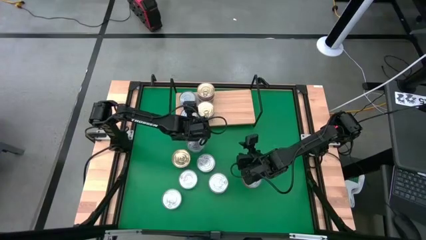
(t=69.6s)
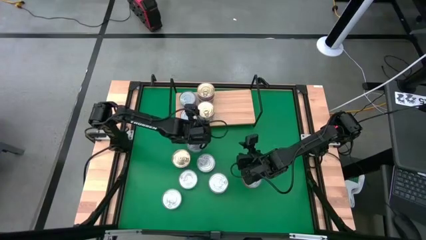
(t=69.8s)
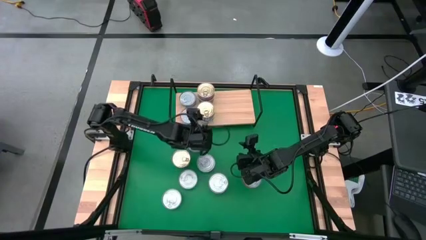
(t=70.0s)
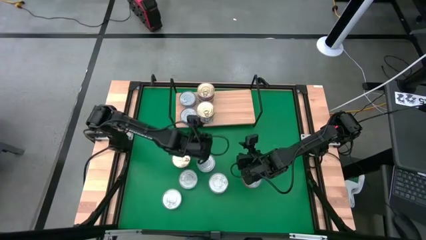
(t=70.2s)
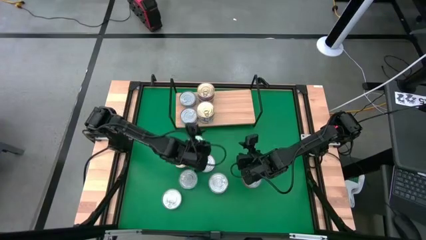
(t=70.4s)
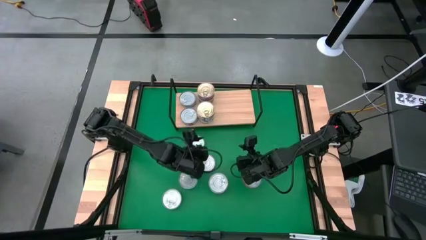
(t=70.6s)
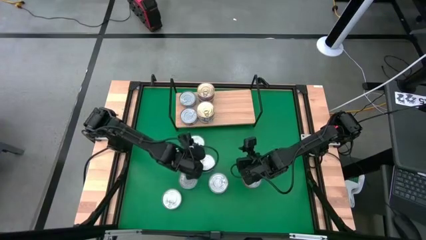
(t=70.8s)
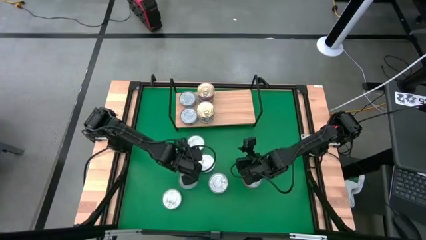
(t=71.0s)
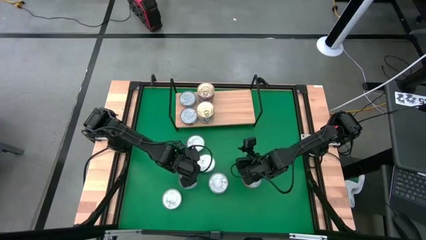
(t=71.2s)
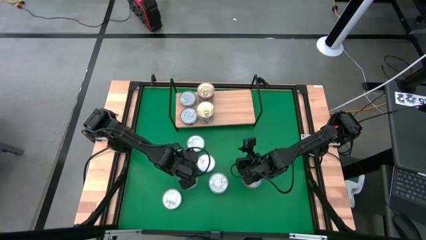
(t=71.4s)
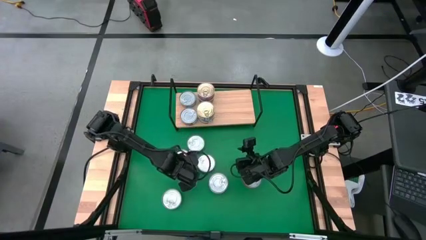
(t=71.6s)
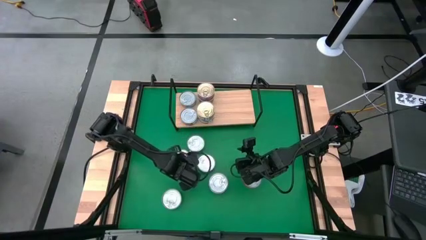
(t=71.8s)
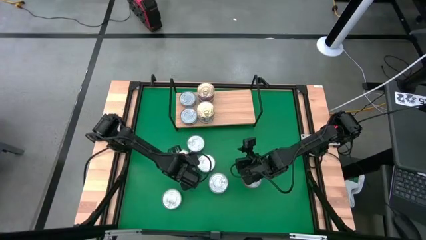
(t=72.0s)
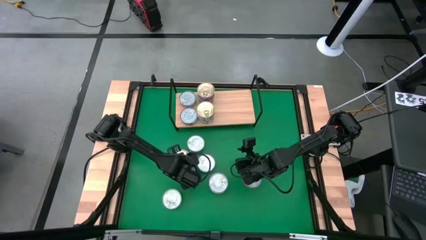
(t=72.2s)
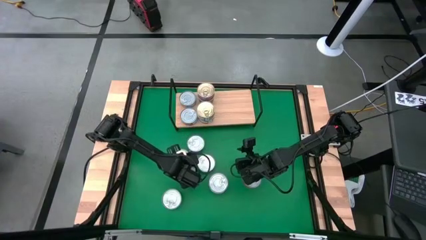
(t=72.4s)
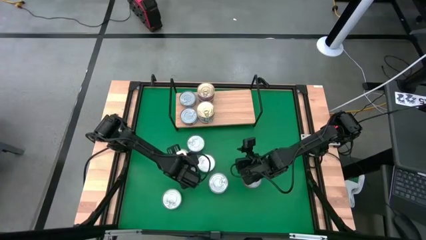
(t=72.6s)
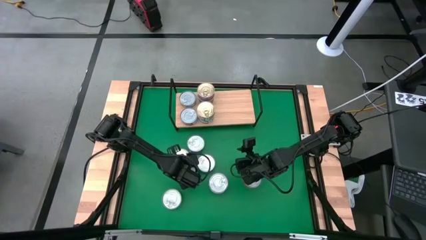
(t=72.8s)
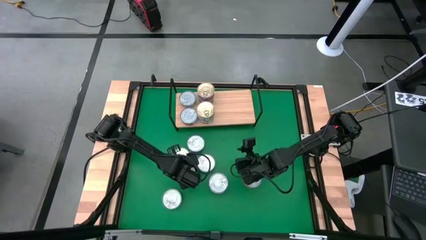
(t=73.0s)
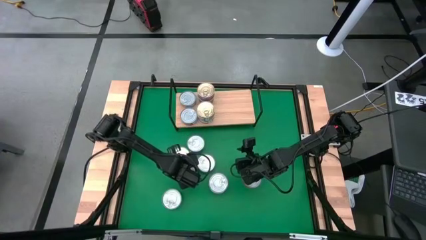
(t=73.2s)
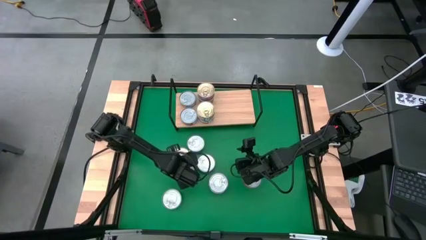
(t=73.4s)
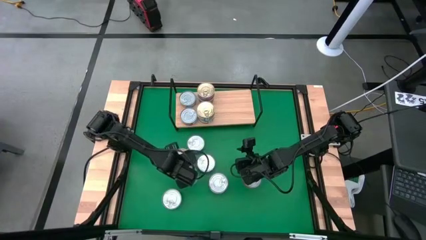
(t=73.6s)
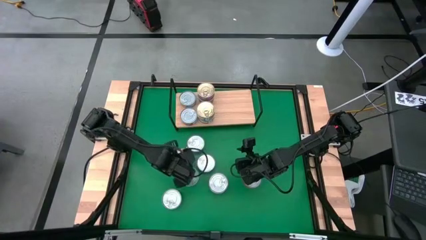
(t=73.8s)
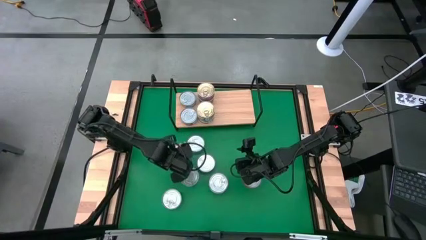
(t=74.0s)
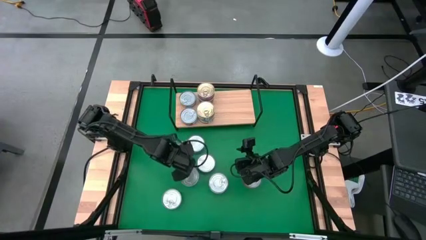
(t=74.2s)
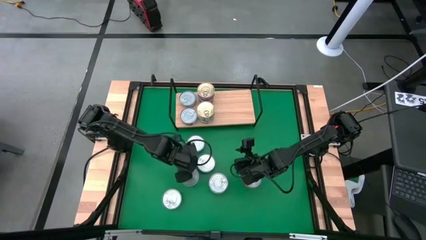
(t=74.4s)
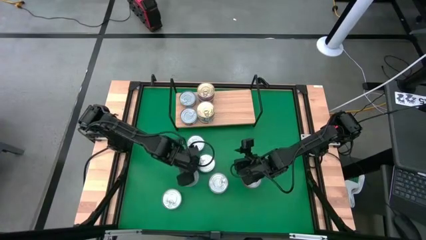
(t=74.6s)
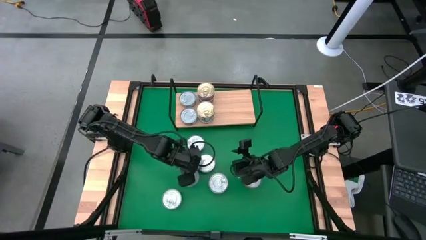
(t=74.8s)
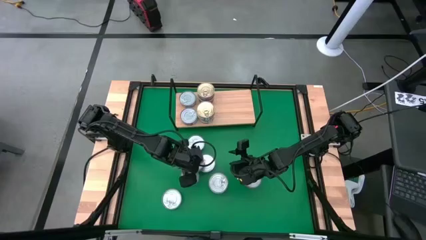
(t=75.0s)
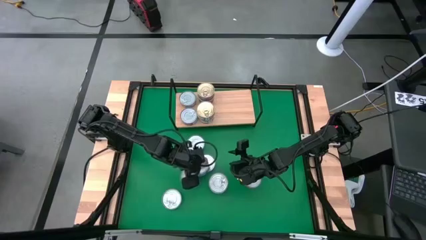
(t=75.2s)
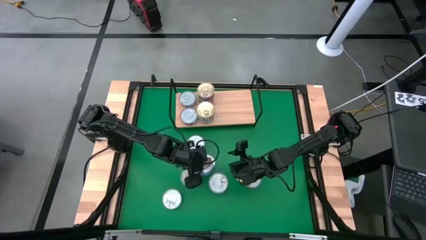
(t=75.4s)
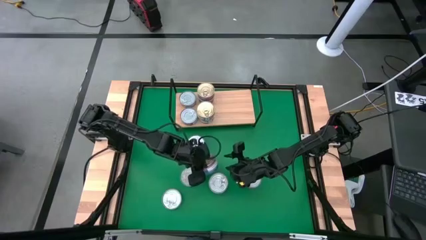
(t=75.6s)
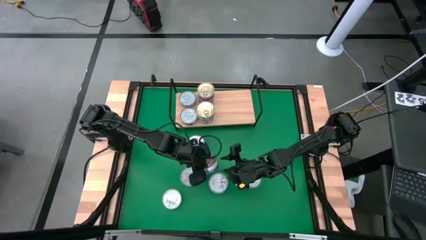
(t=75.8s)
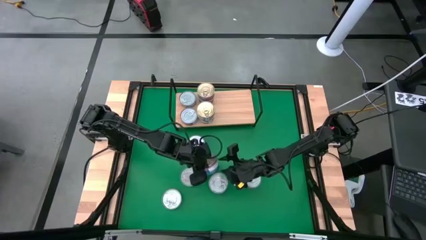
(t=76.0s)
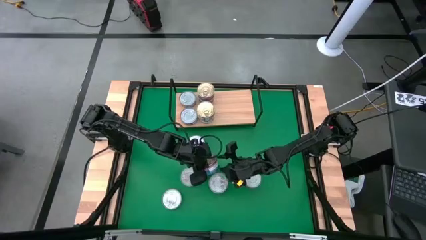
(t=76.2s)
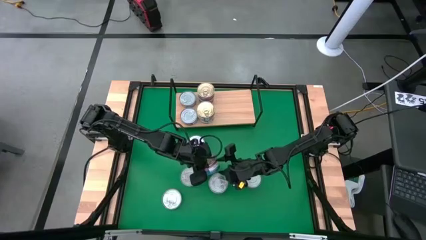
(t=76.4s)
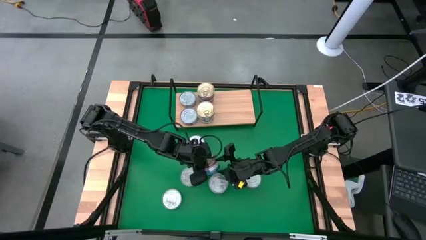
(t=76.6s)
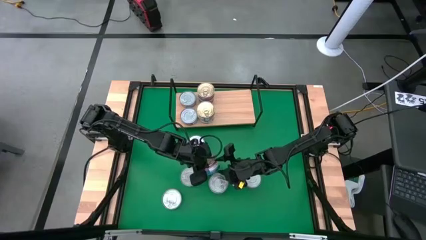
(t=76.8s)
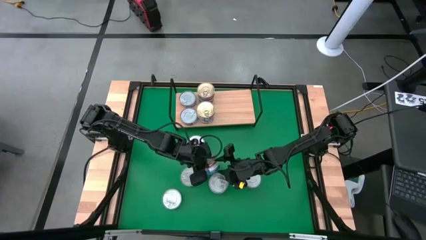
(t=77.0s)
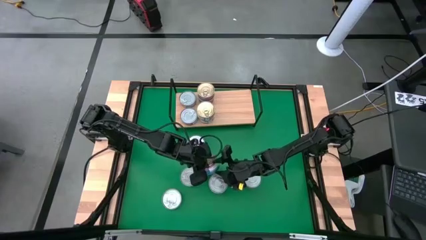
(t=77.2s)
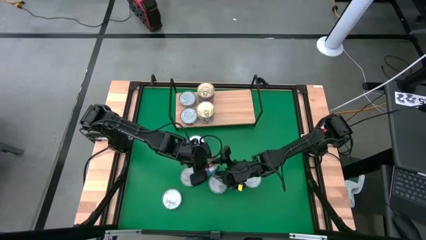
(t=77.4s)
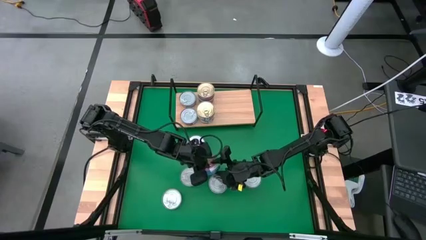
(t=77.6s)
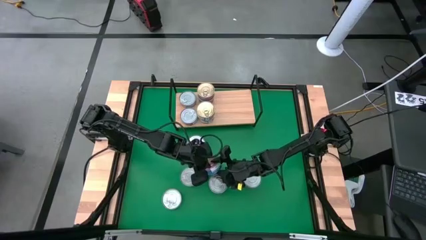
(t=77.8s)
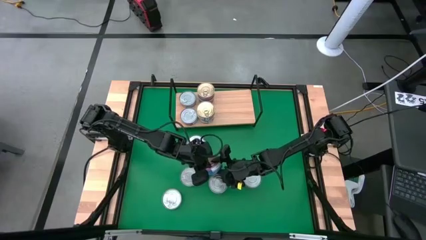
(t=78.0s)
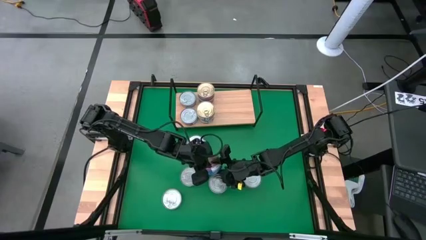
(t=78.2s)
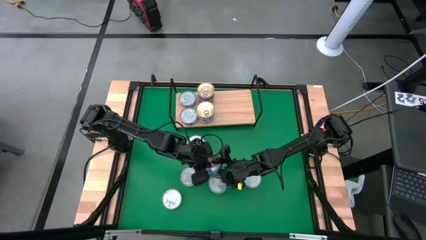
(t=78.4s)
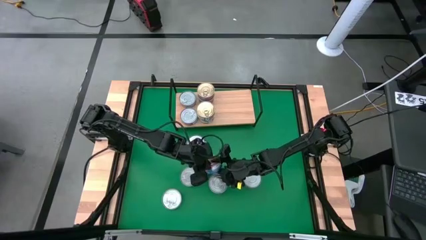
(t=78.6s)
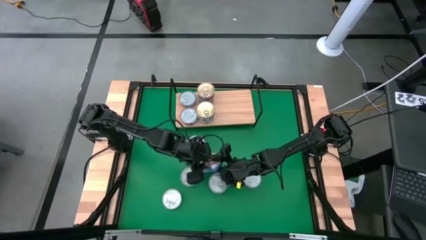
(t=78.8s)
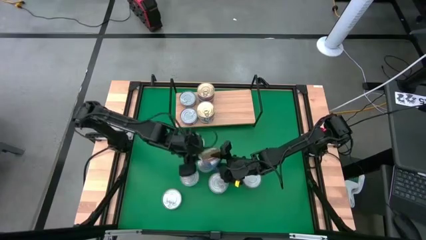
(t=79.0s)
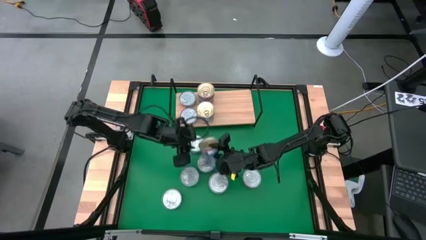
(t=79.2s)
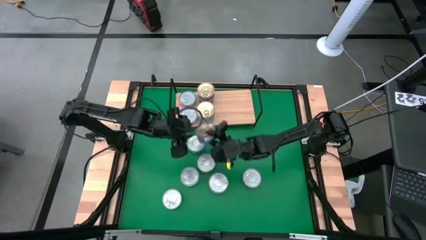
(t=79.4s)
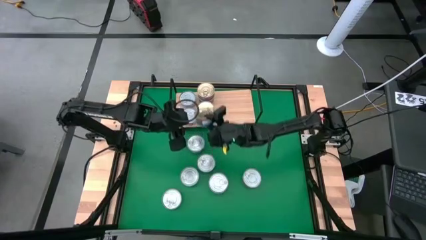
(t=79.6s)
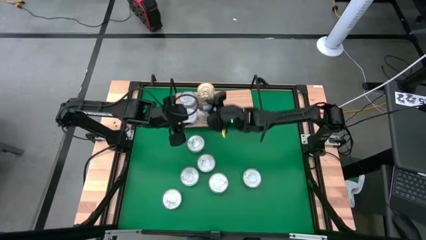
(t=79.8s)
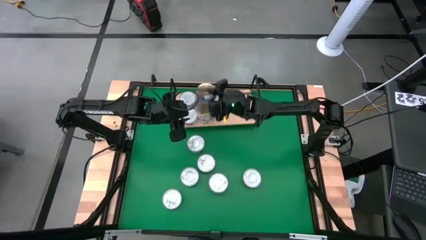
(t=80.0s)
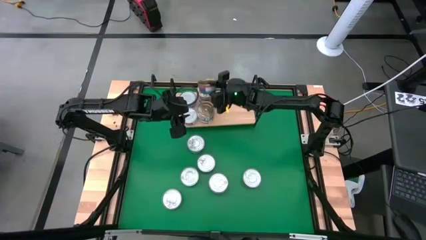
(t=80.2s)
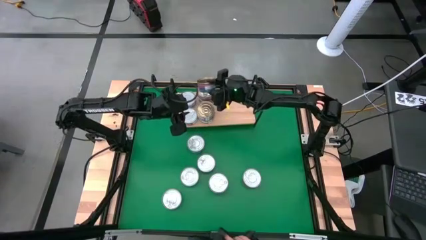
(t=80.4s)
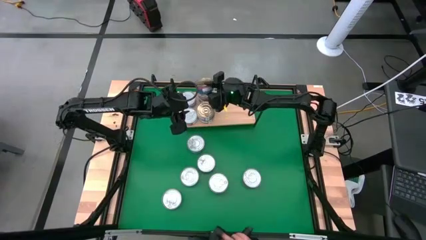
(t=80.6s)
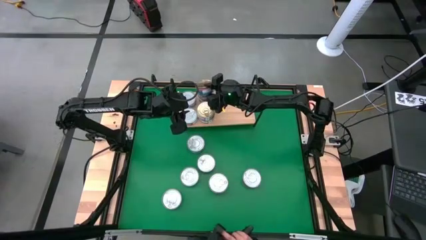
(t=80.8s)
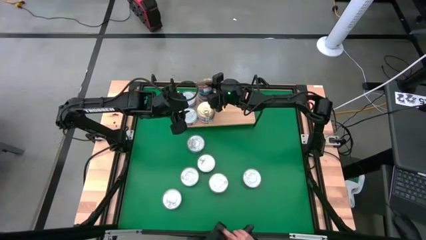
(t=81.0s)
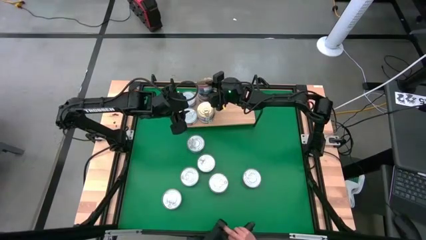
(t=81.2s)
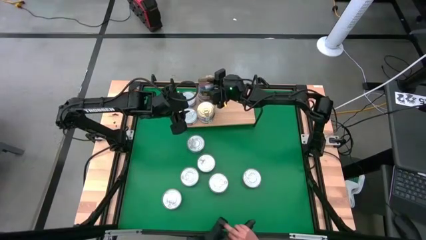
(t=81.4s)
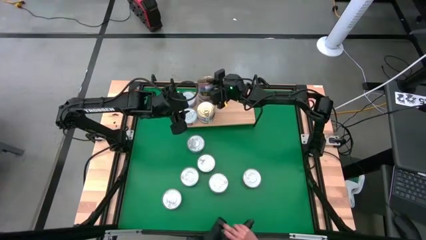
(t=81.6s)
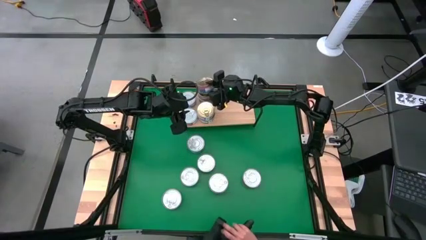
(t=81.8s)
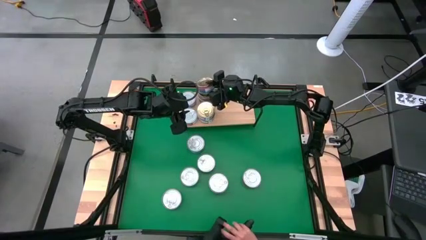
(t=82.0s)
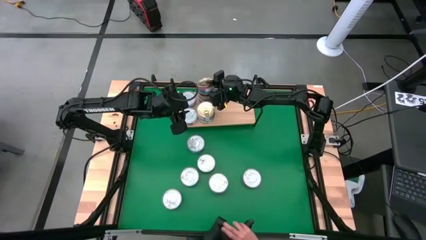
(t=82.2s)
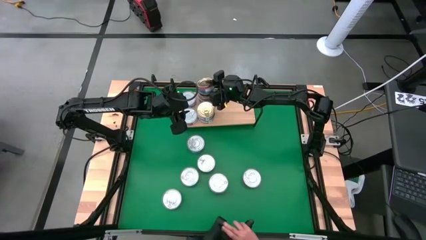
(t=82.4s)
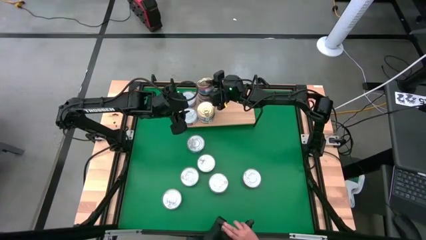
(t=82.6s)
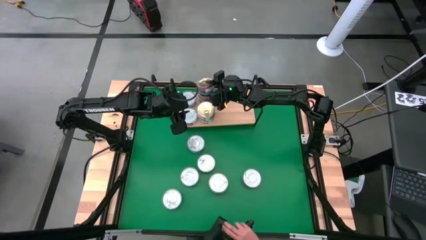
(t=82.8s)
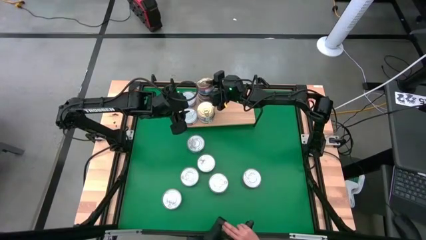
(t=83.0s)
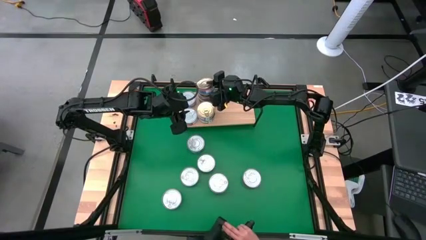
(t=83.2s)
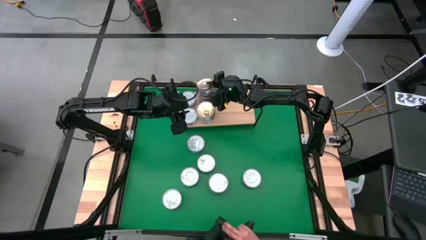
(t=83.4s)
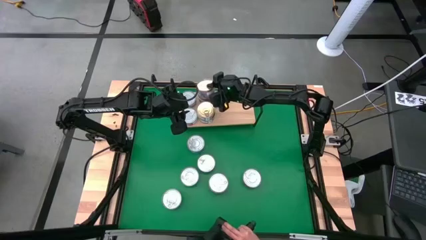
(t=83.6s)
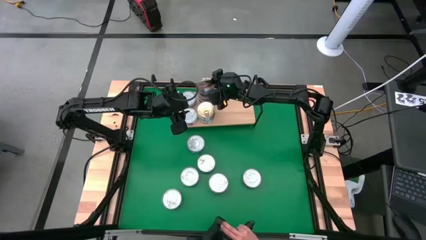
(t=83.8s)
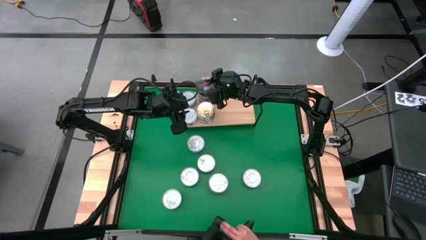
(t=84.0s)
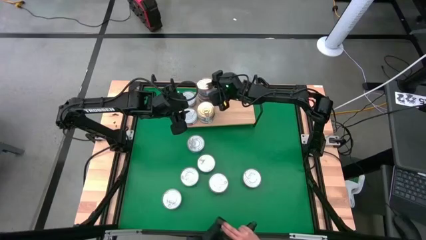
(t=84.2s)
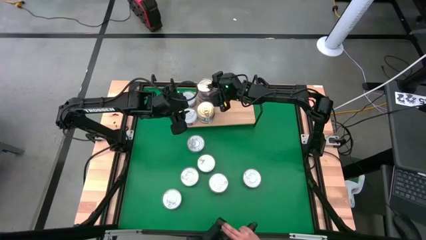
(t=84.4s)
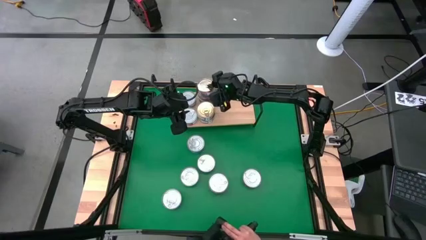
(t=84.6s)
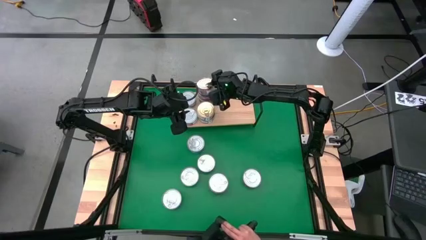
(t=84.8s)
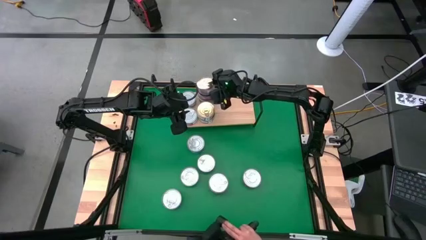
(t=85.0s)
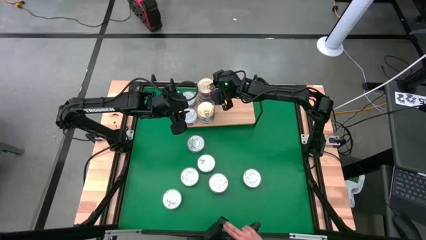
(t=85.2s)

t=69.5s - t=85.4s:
Task: Stack canned seafood by type on shelf
Stack the blue-pink tuna can on top of the blue-pink tuna can on the shelf
